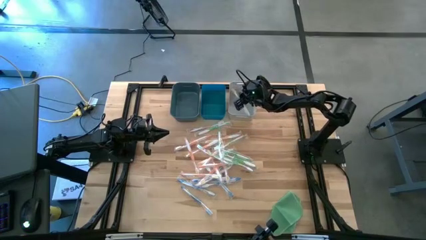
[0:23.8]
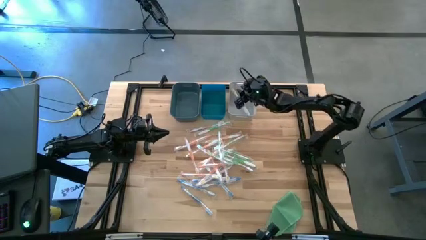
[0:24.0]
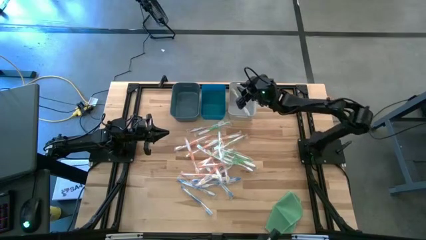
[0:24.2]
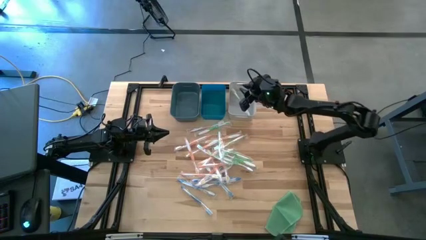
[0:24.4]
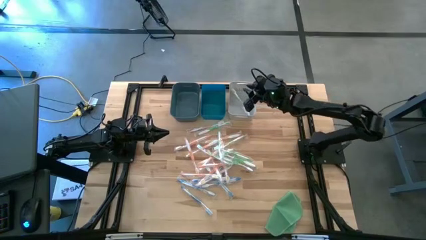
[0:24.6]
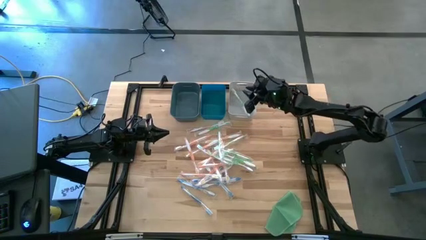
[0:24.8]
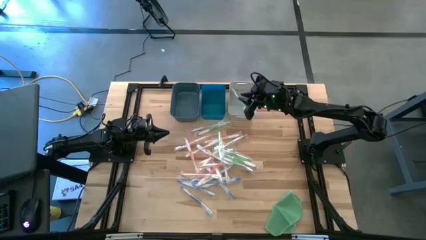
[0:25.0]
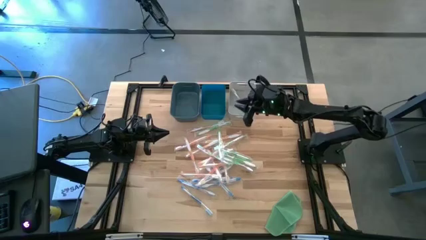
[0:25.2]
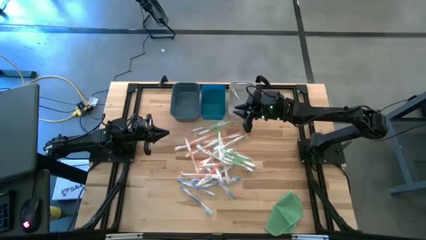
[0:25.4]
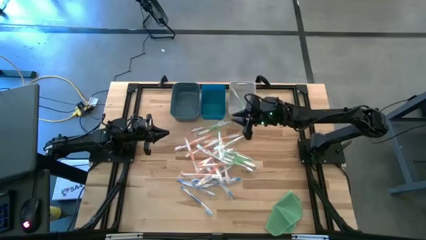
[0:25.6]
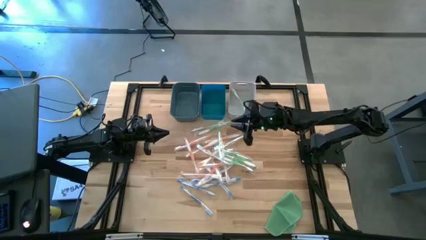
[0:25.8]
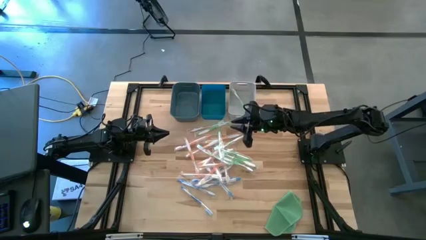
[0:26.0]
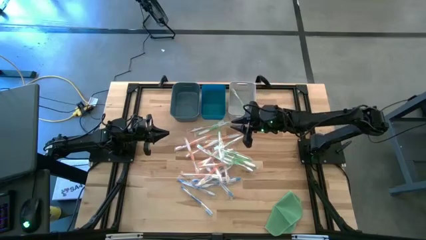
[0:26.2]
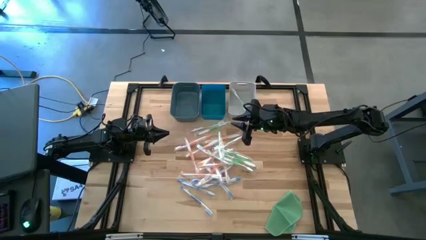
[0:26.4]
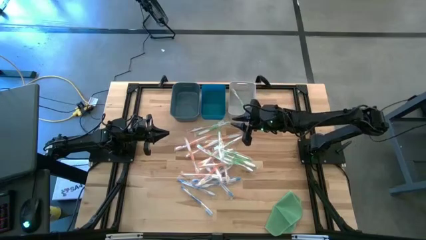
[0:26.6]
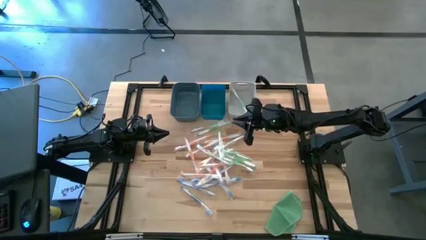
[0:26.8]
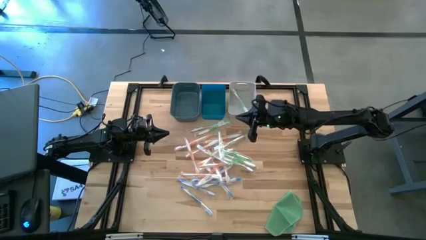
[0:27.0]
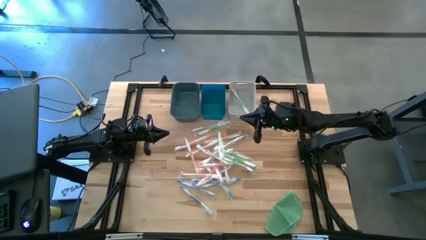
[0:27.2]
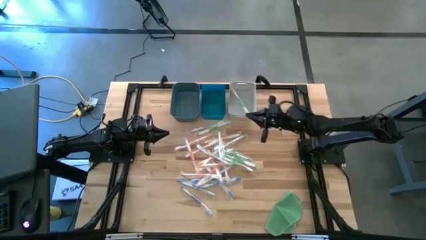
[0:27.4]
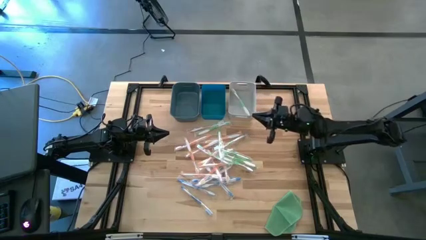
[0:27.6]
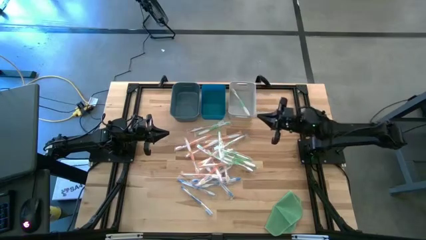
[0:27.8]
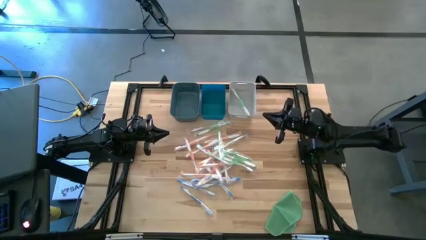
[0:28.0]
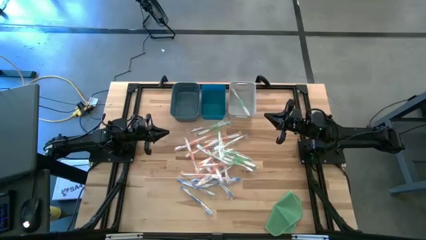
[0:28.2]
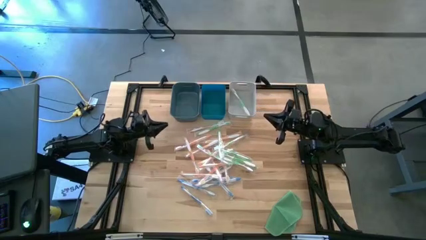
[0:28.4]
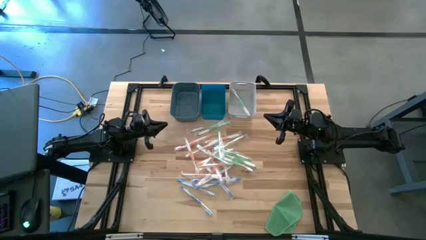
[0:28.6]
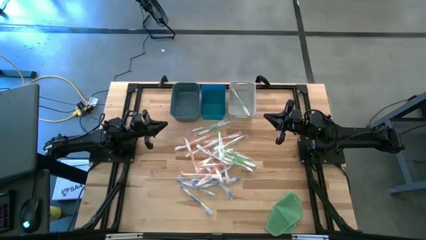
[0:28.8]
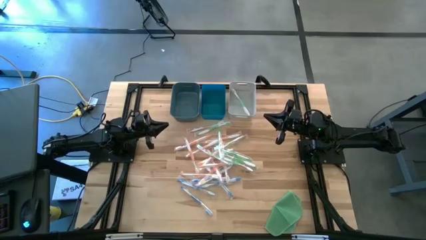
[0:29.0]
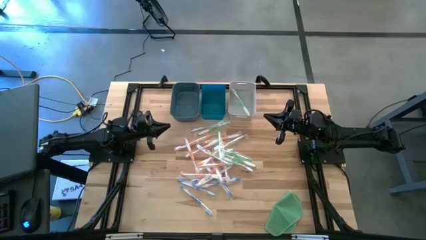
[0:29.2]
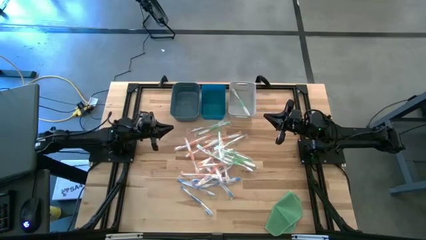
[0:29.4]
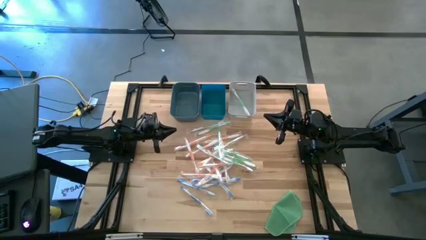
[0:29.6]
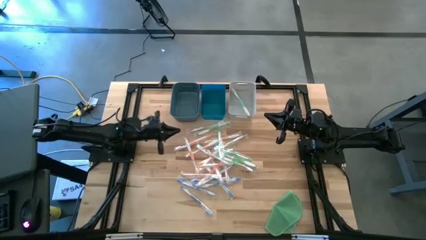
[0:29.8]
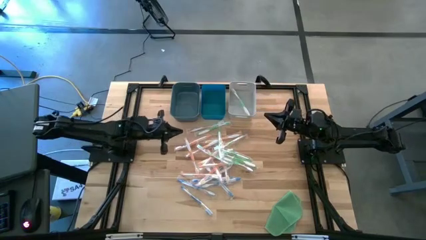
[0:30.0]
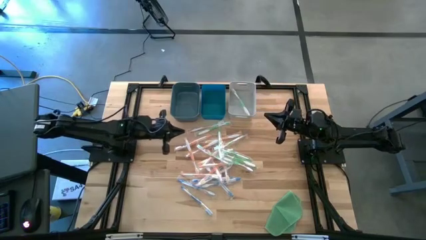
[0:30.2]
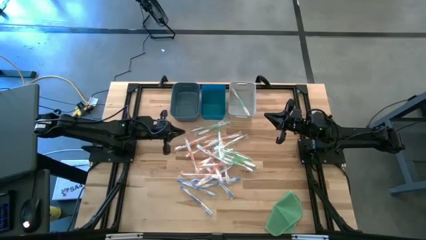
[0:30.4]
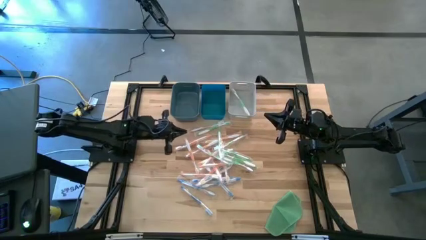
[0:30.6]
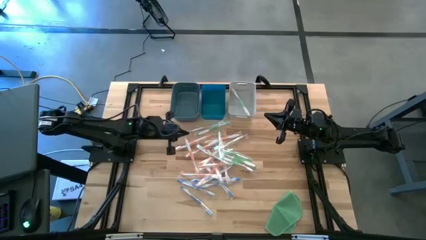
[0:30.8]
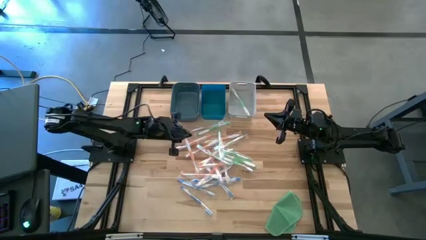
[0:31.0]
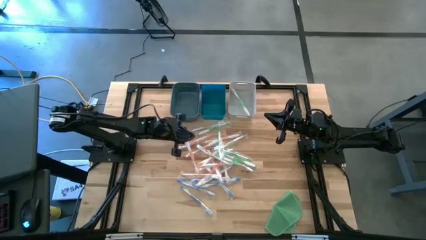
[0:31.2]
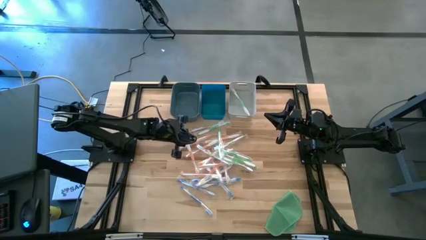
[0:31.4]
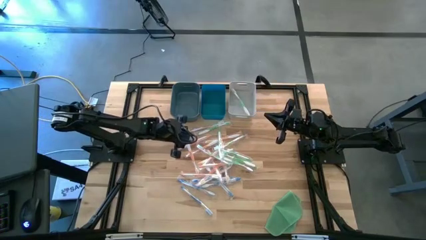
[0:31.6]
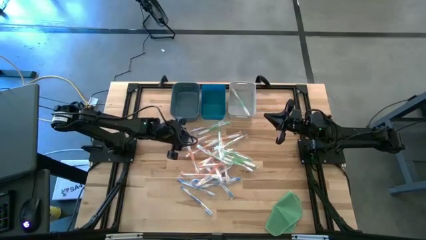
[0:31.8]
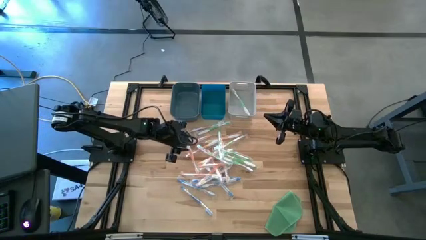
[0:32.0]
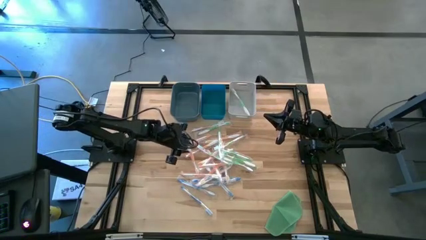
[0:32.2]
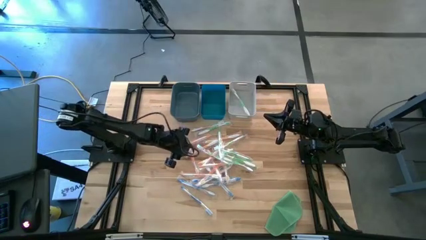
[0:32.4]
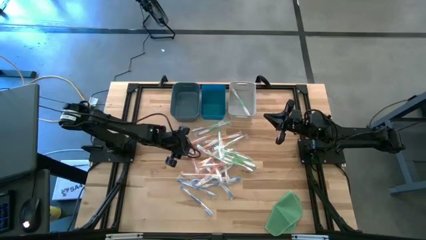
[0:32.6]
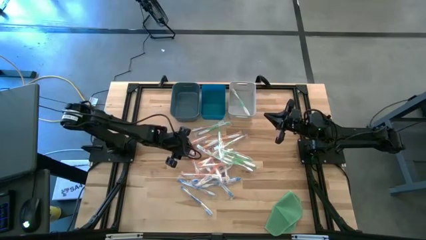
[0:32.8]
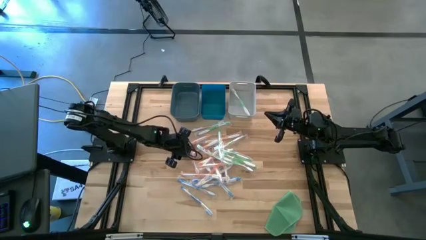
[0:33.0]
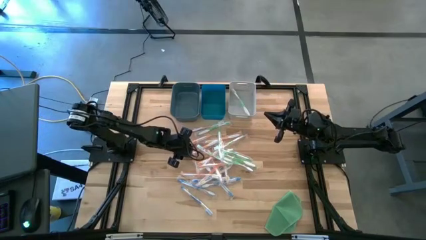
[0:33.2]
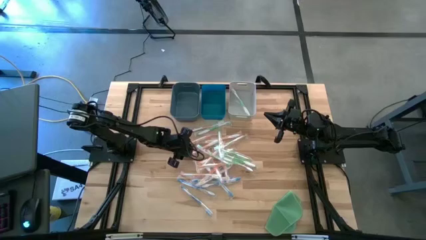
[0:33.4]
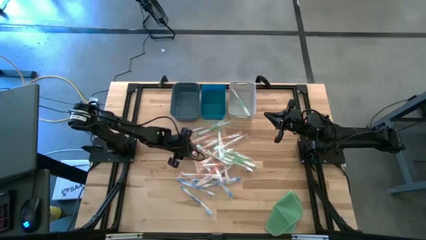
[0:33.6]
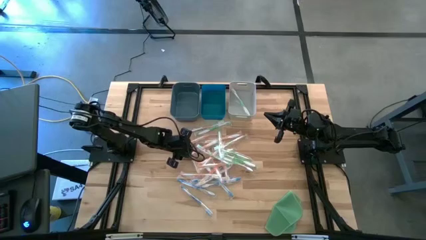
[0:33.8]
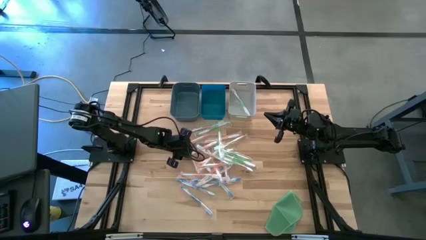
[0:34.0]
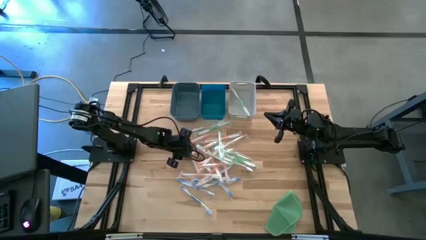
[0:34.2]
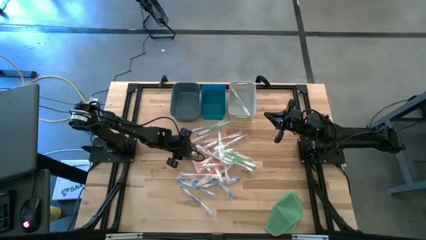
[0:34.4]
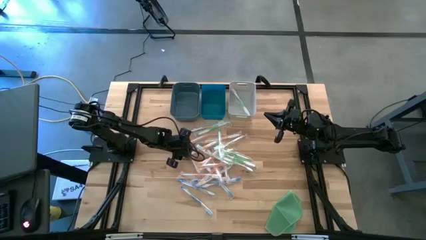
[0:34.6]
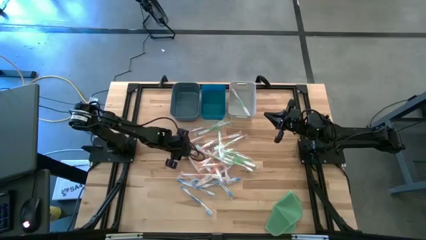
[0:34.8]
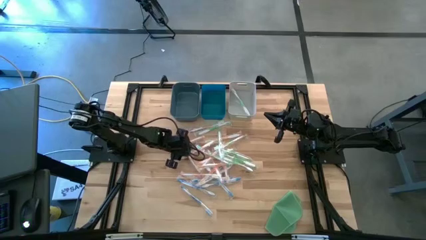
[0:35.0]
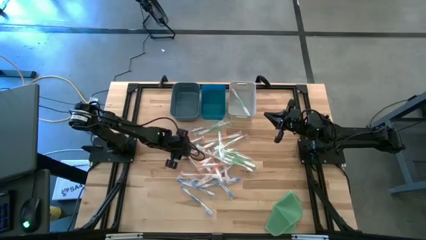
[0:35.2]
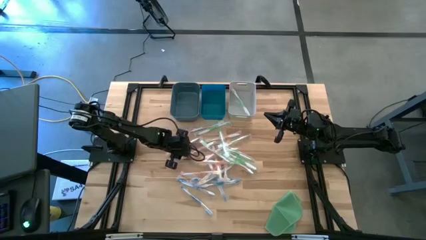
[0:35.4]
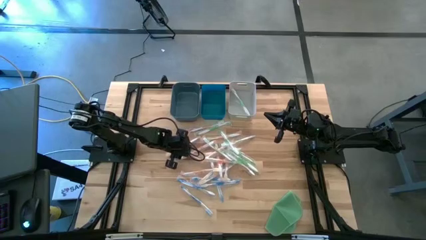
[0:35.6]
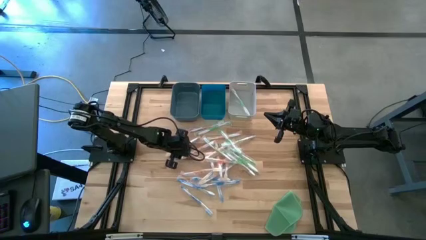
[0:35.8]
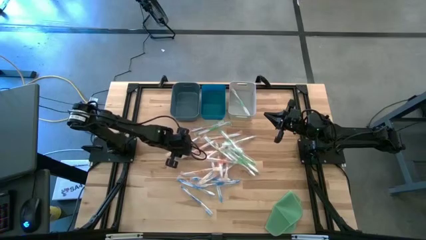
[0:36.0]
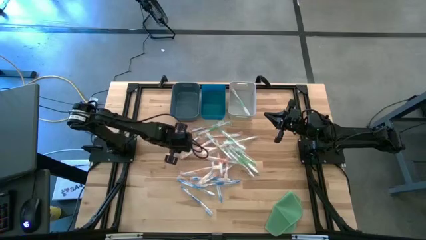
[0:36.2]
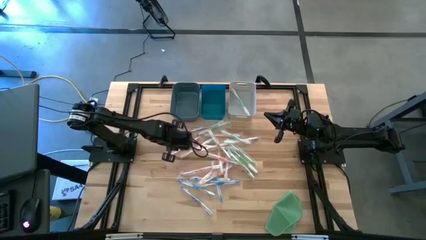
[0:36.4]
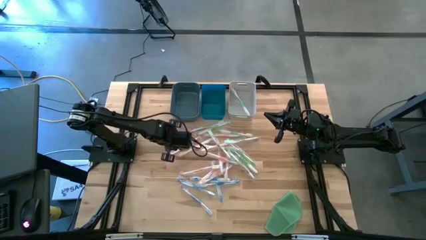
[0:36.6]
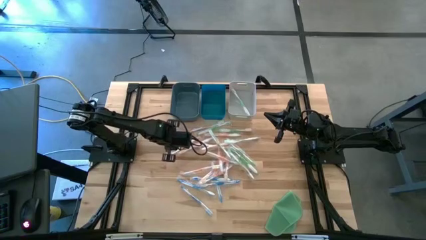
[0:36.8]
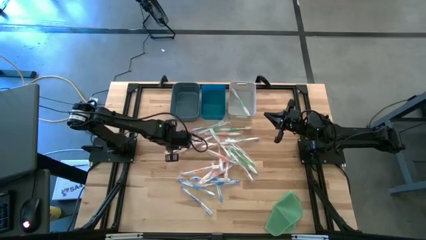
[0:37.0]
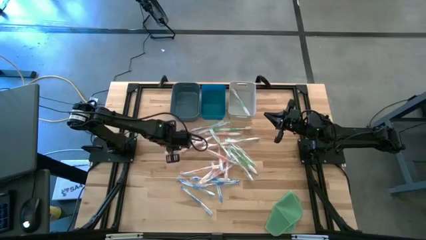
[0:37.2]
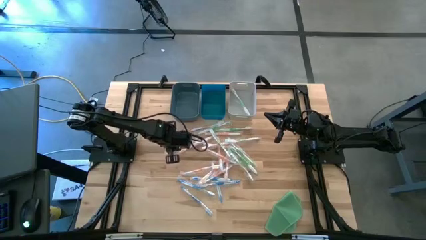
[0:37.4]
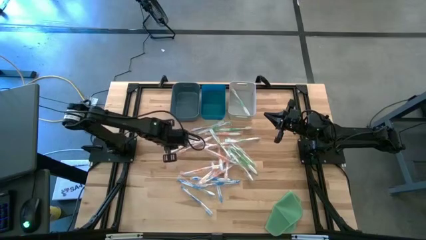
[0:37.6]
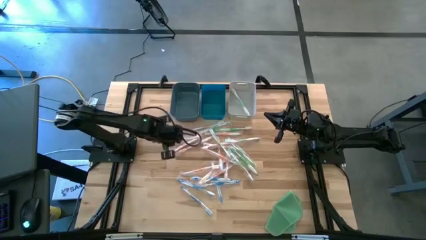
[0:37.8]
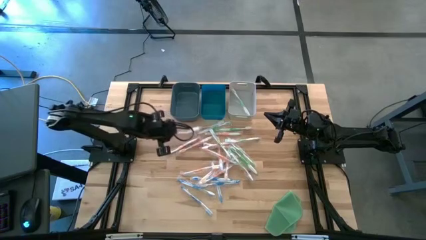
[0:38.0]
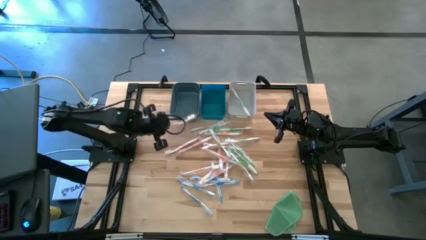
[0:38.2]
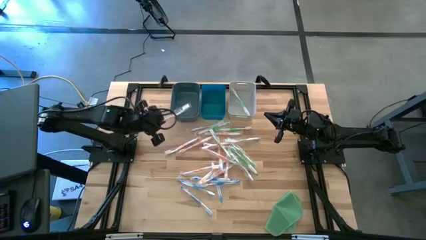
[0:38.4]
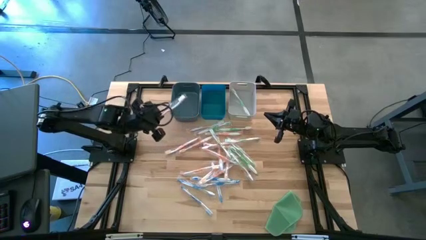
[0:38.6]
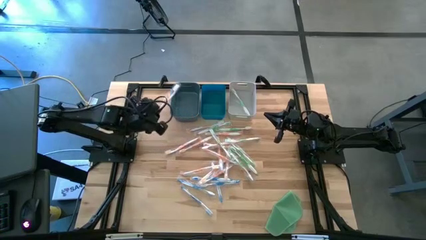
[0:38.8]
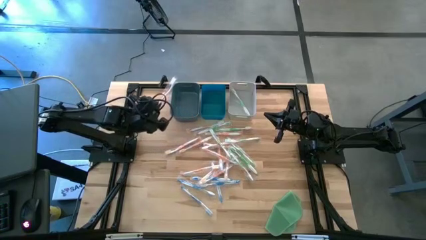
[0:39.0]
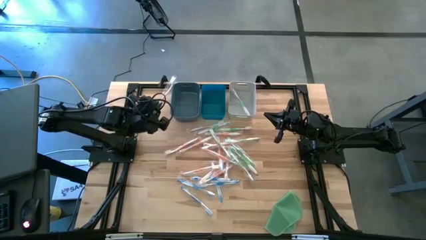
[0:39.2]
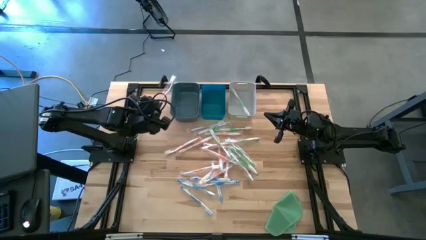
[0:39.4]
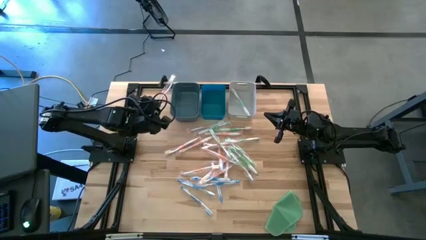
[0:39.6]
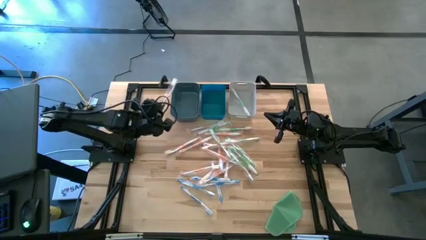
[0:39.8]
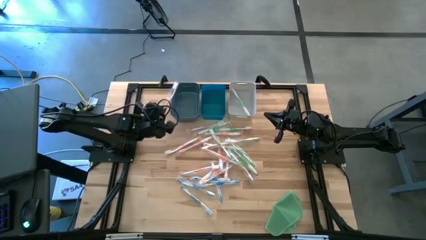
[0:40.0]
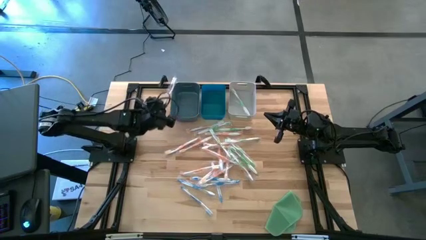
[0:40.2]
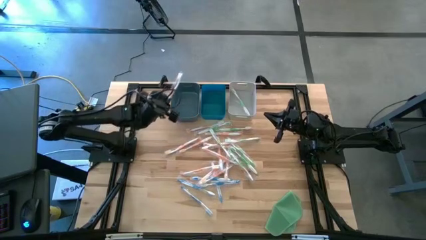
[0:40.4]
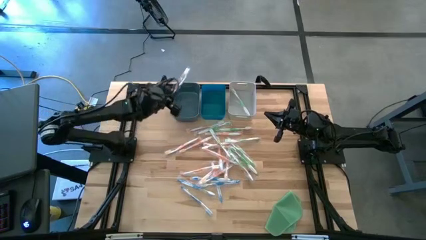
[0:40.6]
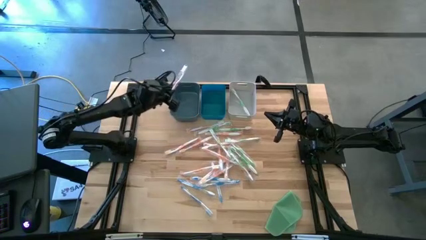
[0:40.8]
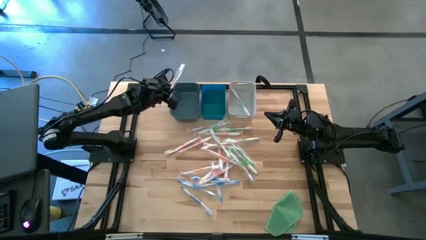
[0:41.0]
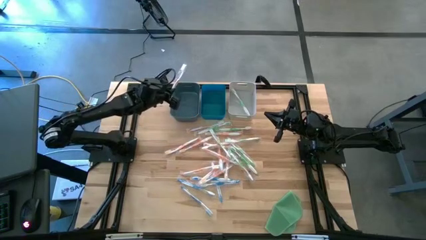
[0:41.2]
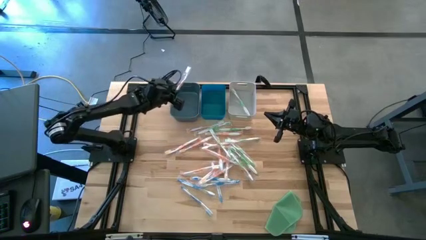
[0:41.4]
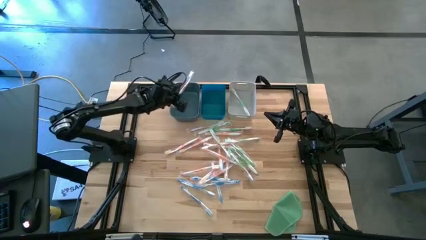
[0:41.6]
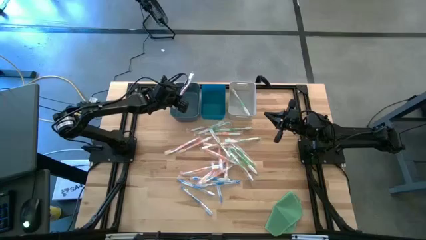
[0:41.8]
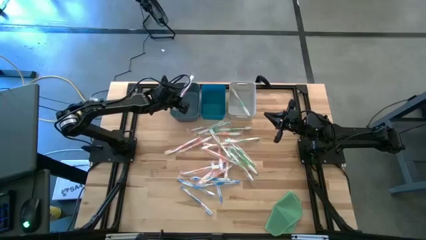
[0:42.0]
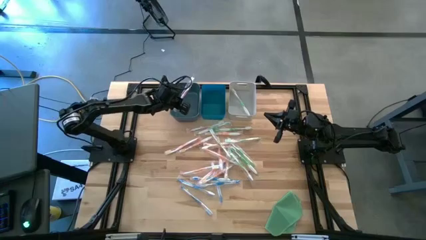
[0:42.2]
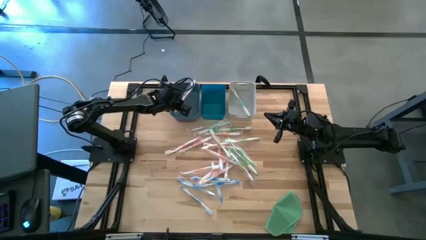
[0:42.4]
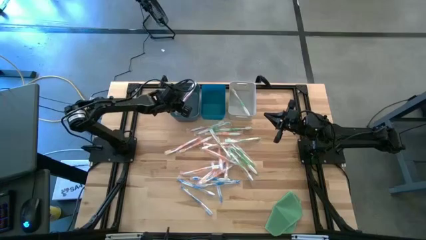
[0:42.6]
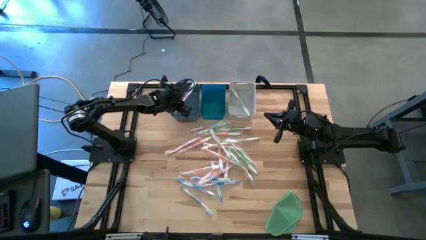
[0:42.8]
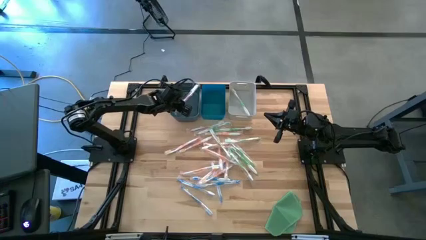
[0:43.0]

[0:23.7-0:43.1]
Task: Pick & Place Toothbrushes
Put the orange toothbrush into the dark blue bin
